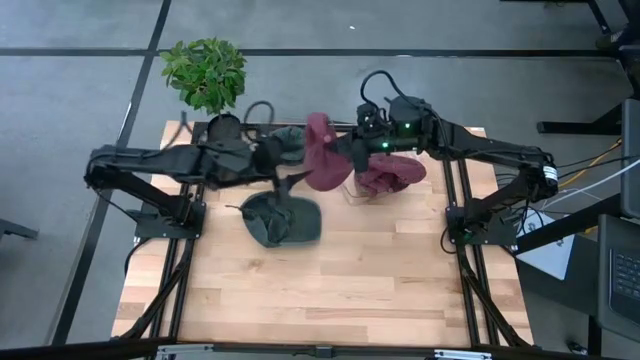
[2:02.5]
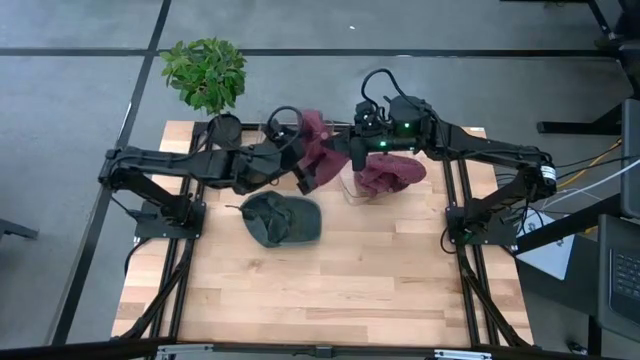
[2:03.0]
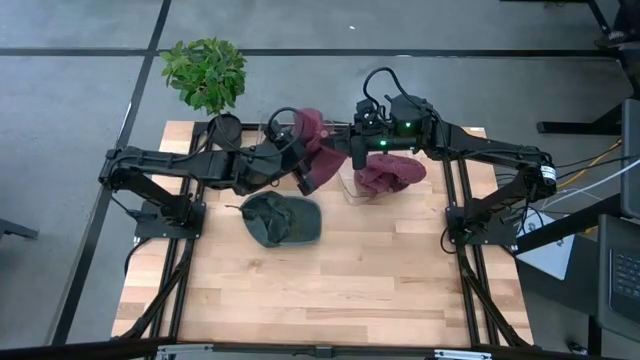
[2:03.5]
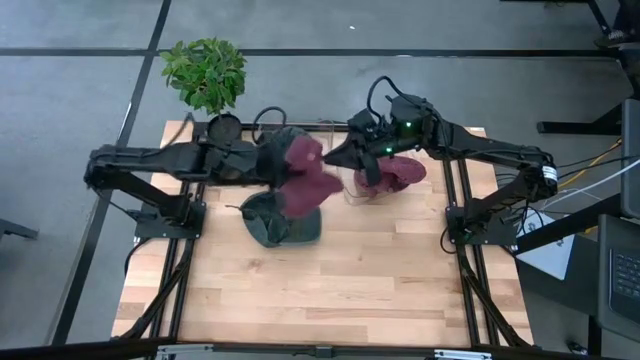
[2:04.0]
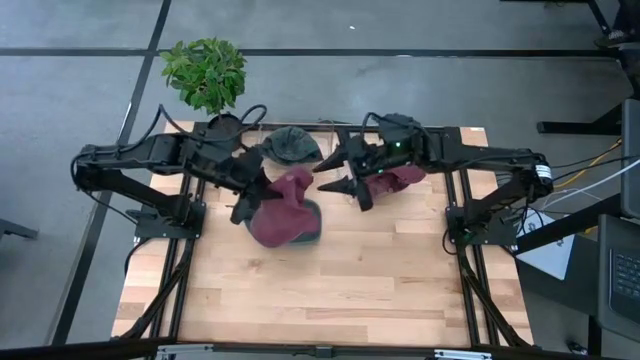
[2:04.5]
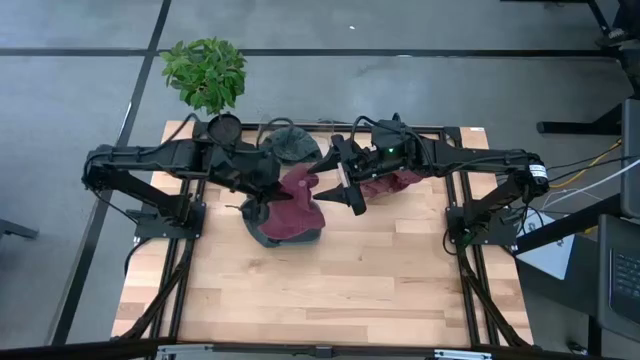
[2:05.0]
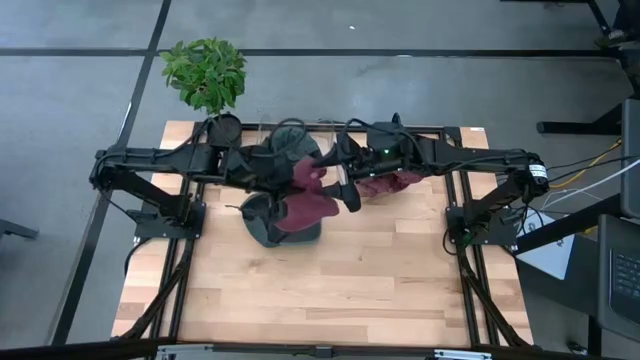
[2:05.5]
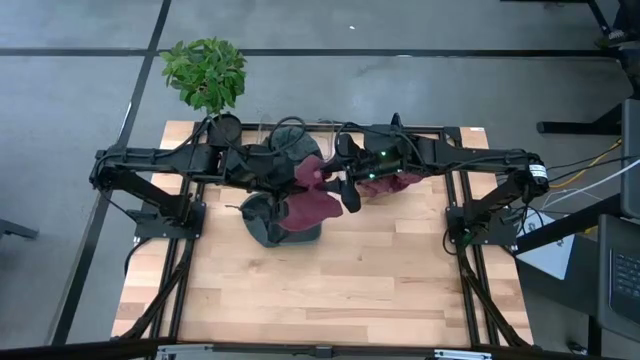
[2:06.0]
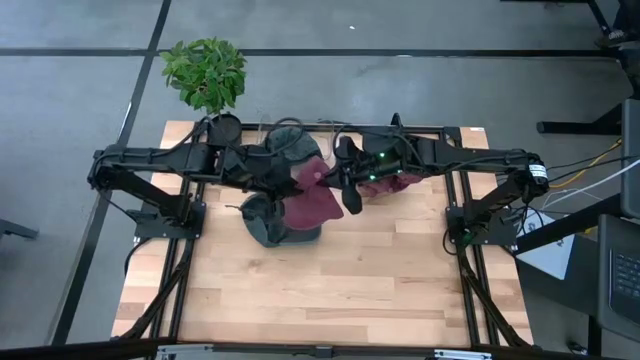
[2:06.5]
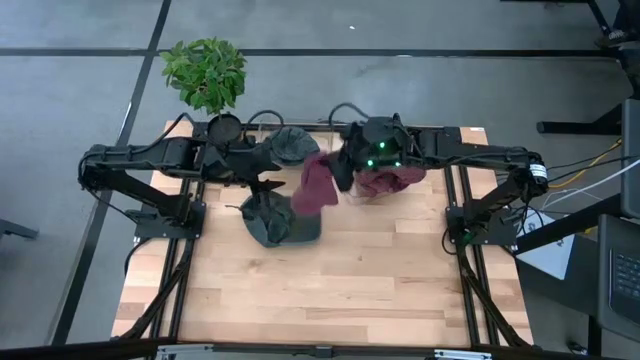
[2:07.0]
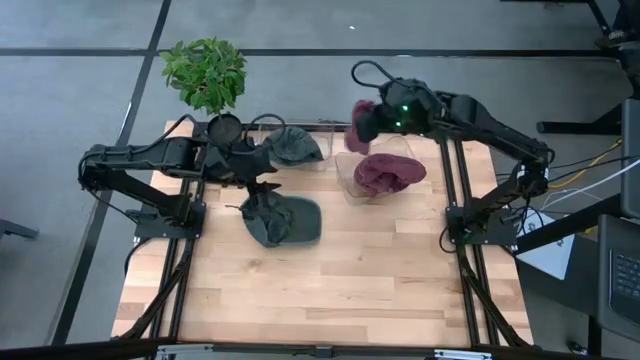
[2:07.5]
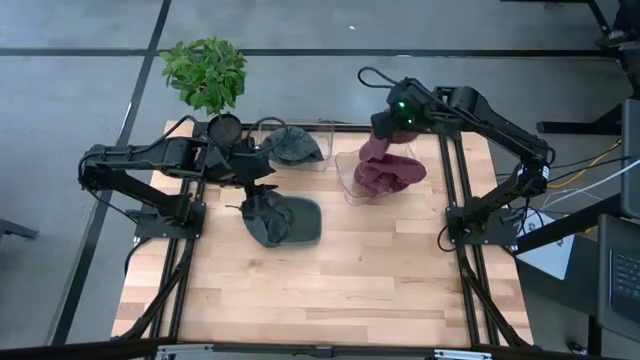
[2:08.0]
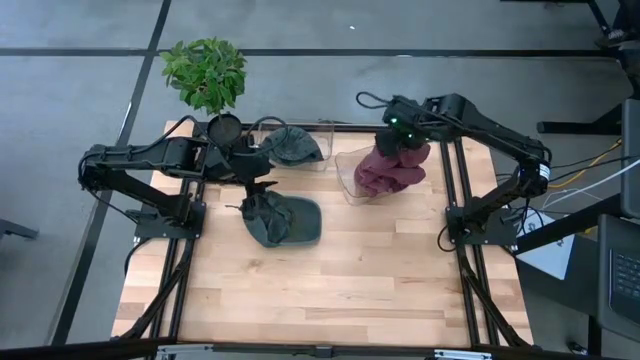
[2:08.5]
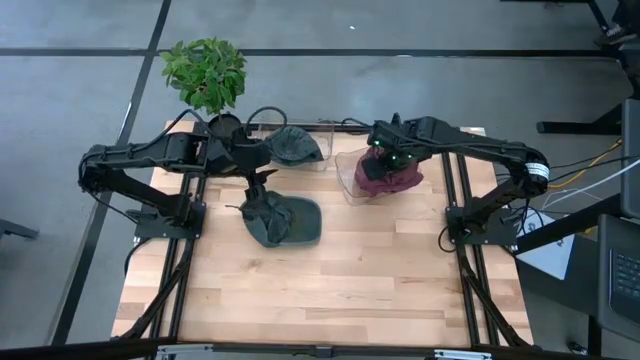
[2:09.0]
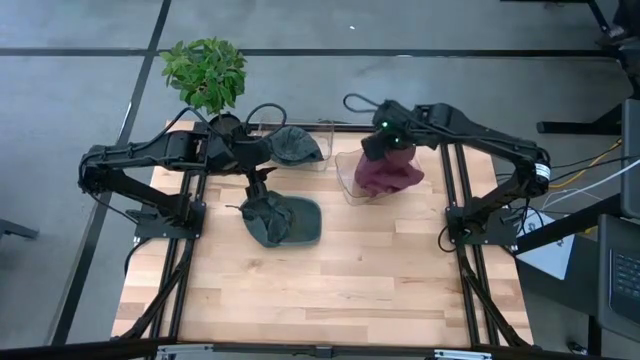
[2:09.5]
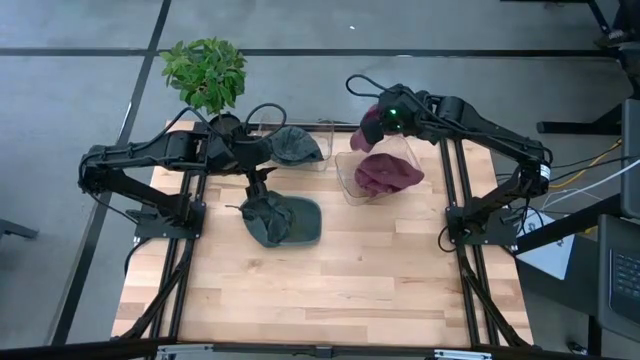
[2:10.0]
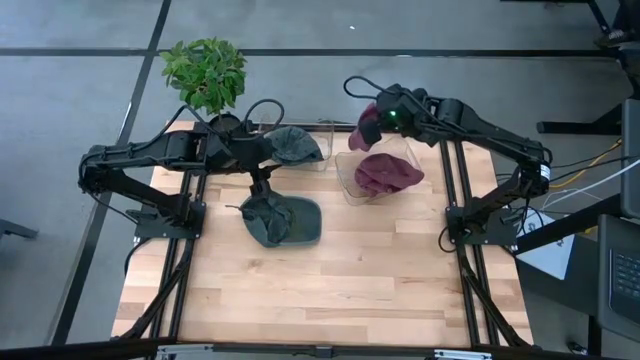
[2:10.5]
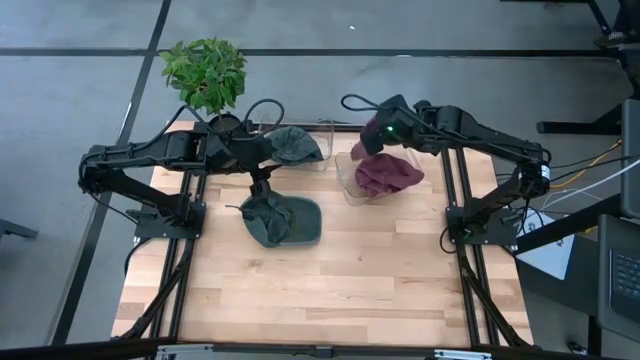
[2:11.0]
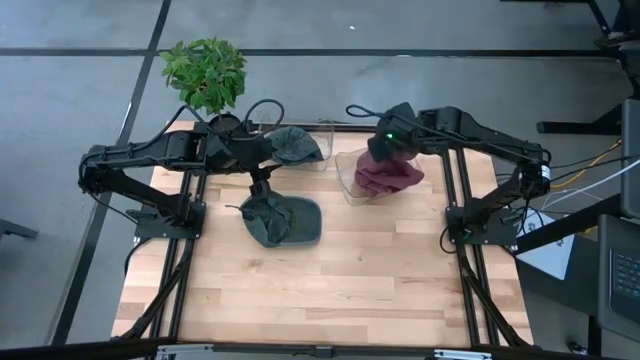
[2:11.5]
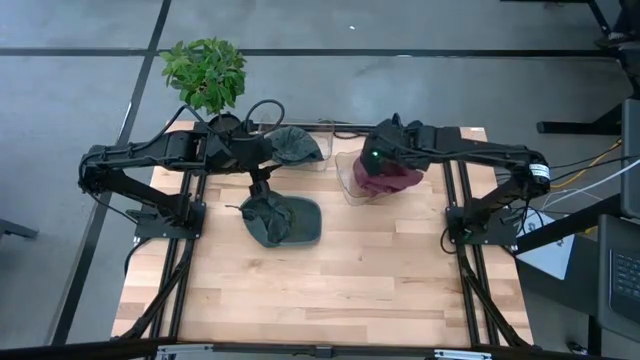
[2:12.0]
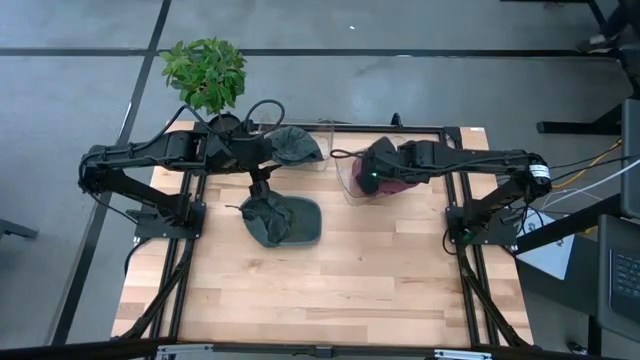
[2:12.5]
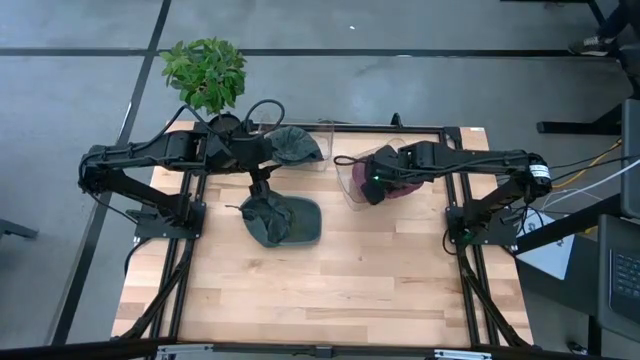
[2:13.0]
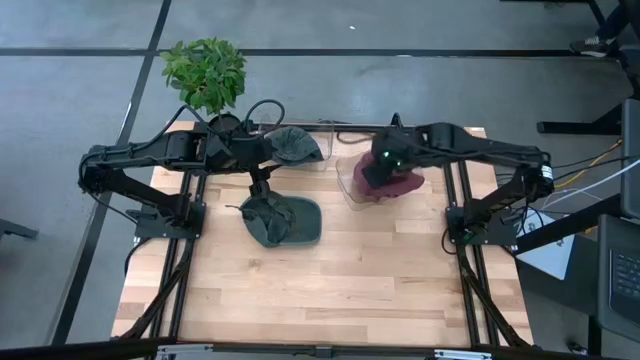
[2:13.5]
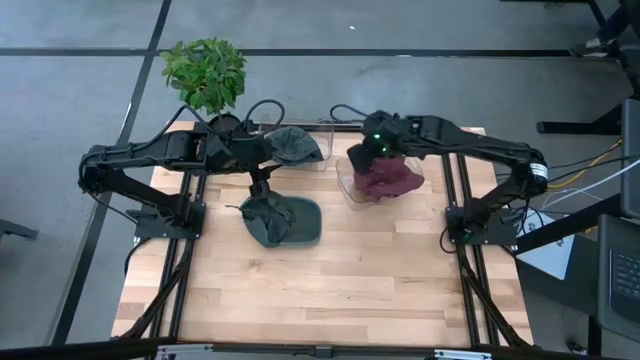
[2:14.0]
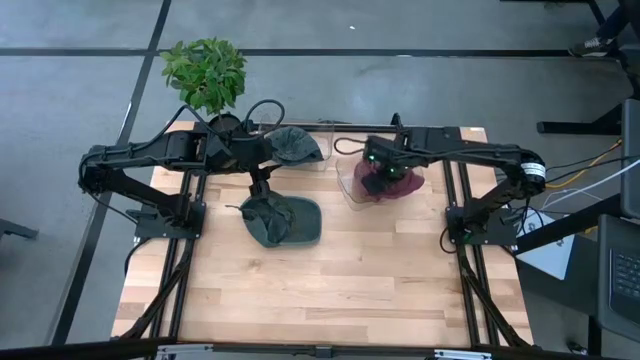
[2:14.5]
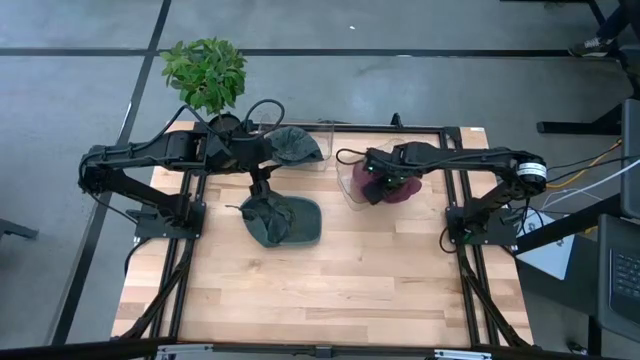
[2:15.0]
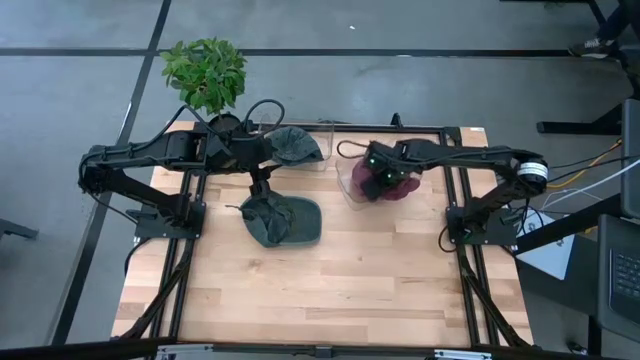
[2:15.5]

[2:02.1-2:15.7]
Task: Pick & Place hat
Put the red cap into the right transparent bin

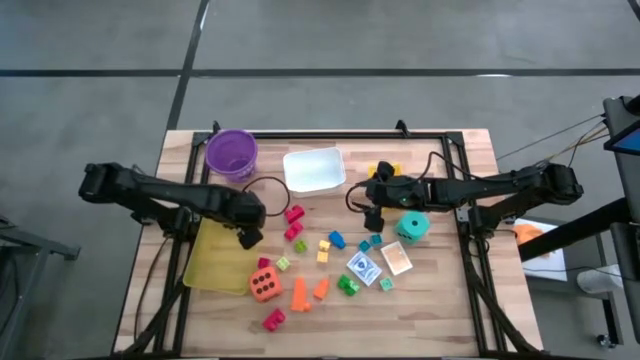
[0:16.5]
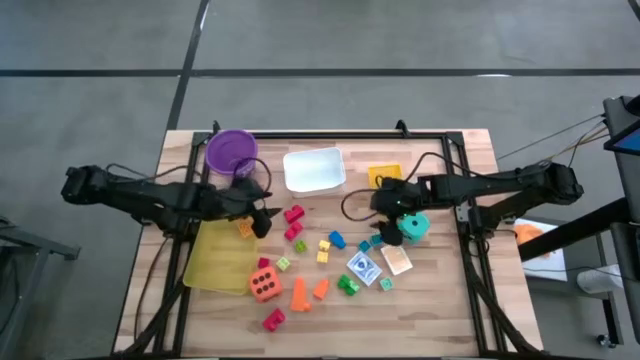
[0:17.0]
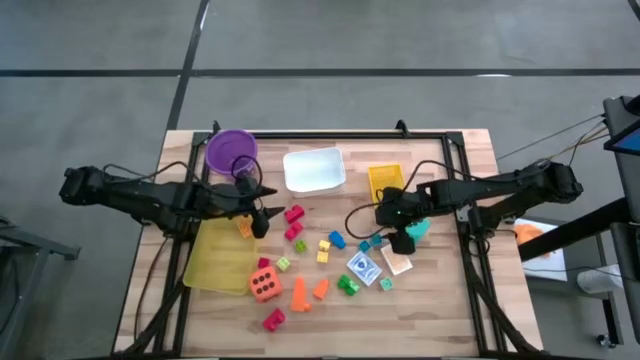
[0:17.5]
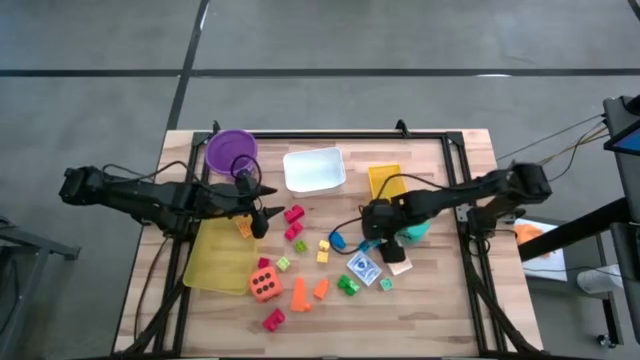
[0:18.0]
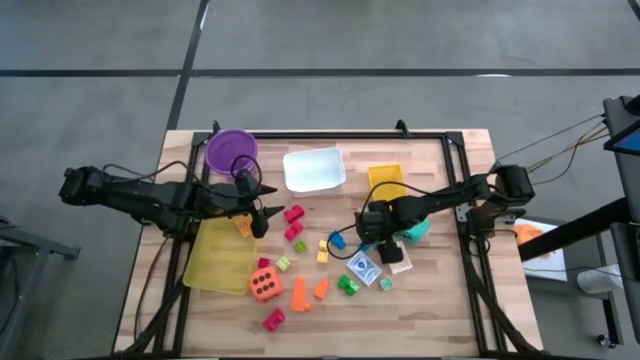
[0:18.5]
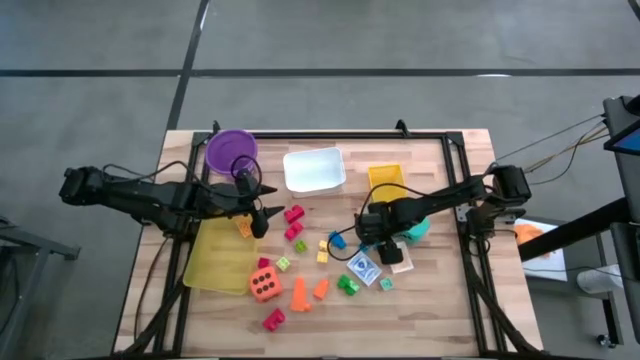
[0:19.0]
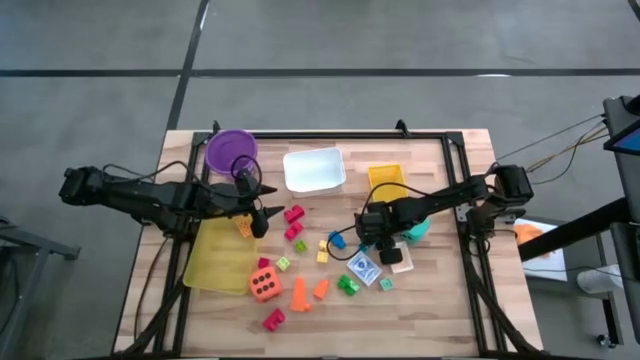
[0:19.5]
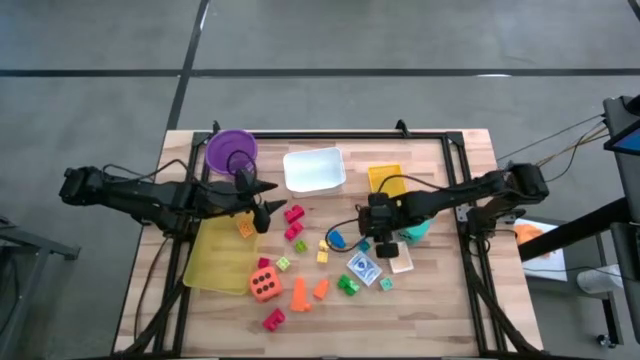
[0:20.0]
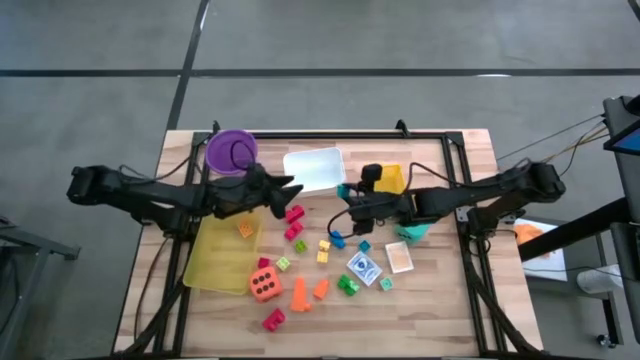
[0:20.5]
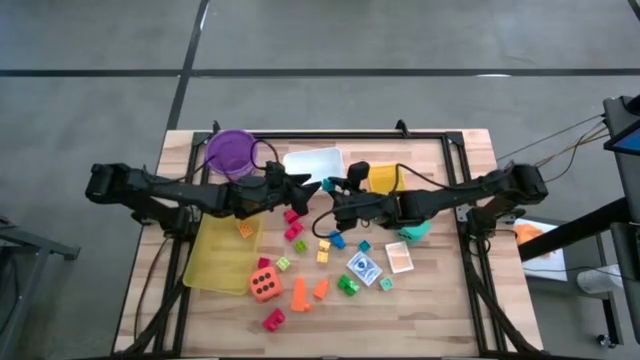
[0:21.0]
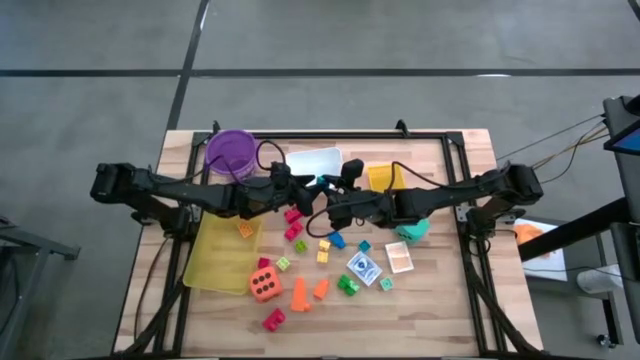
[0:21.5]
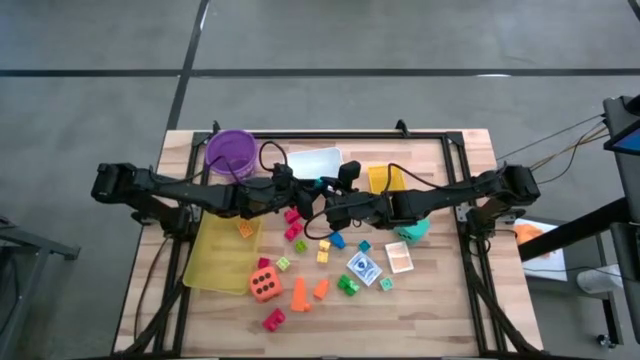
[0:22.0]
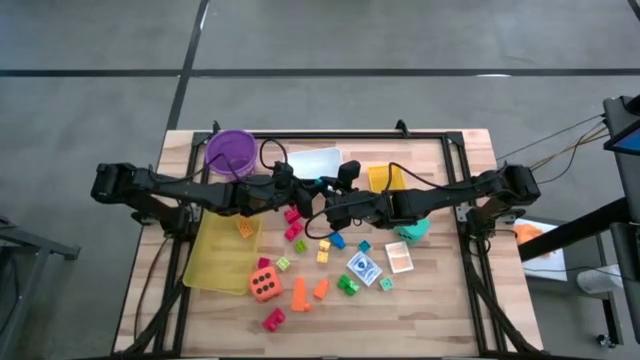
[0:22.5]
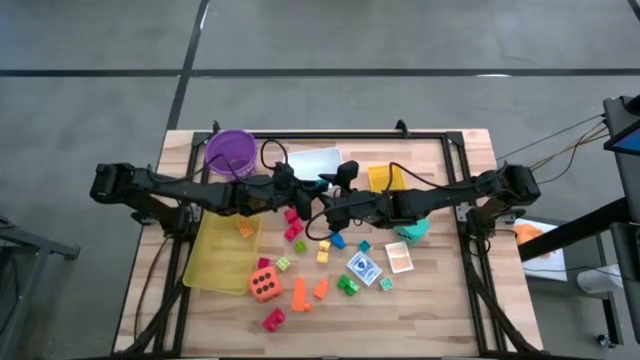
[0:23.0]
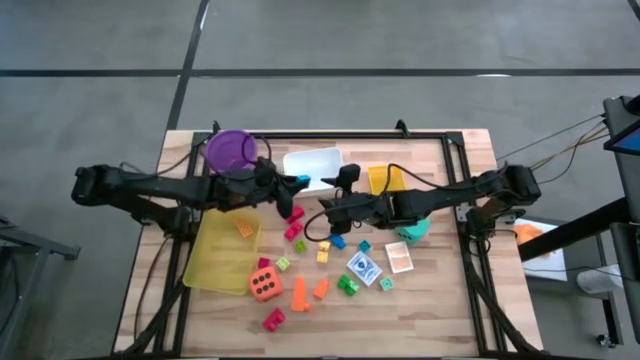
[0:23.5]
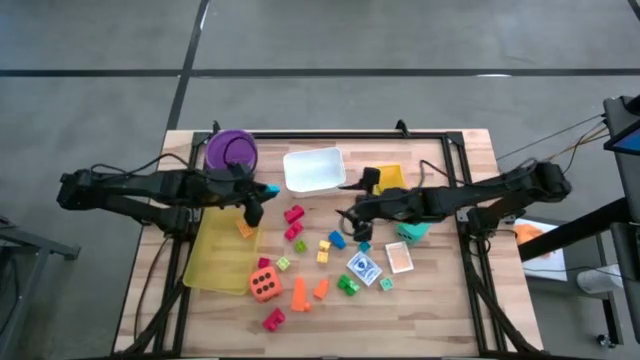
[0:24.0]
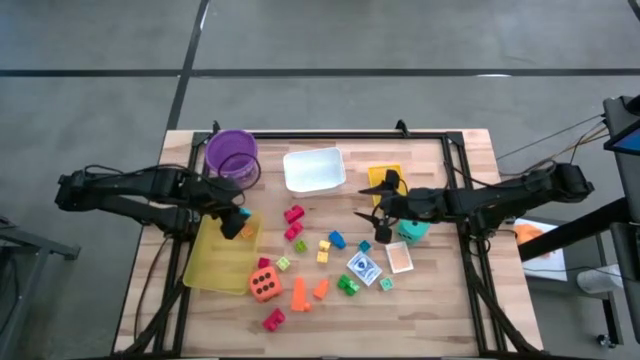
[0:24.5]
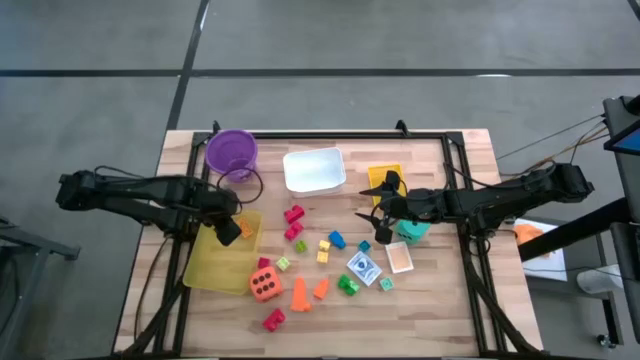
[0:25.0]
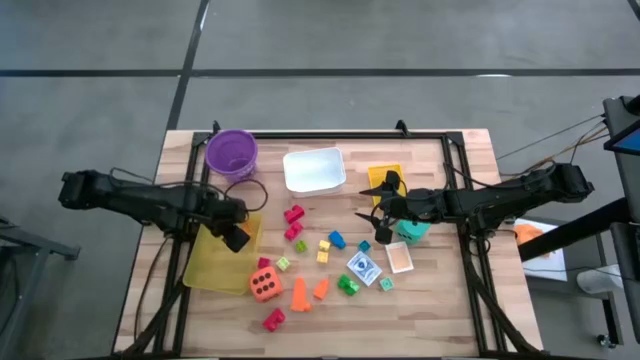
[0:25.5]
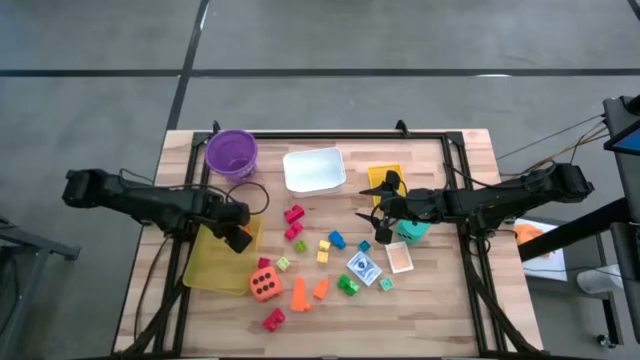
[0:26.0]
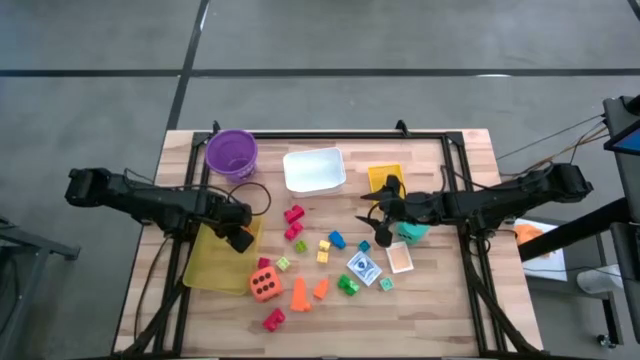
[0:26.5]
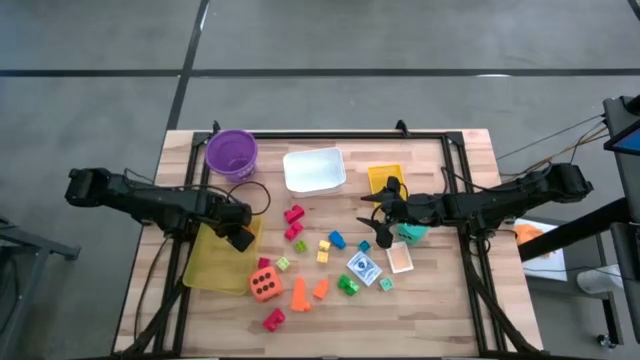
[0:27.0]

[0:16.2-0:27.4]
Task: Pick & Place Toys
Put the blue game piece into the light yellow bin
